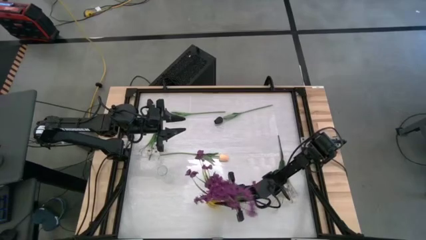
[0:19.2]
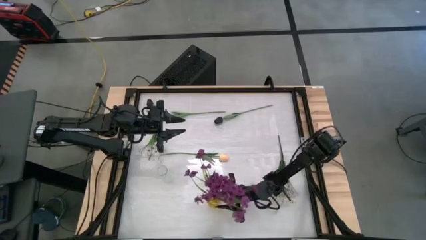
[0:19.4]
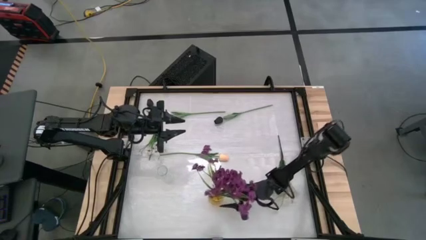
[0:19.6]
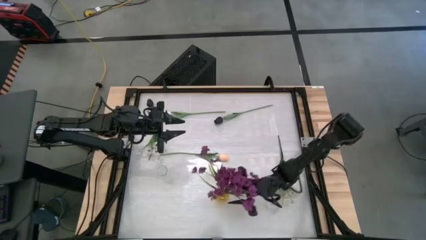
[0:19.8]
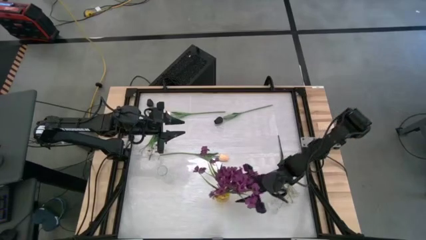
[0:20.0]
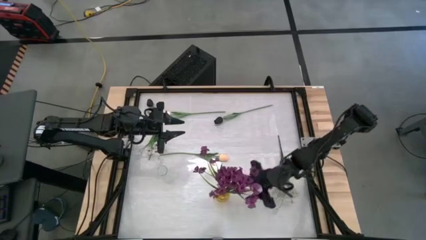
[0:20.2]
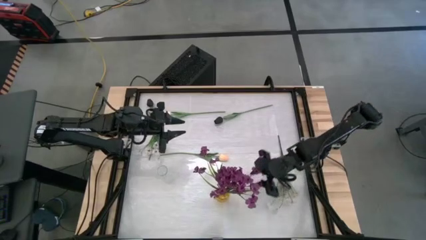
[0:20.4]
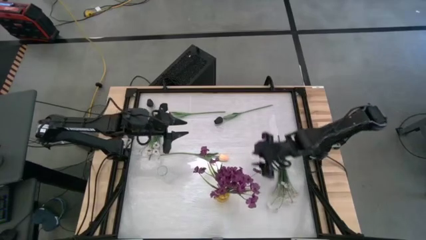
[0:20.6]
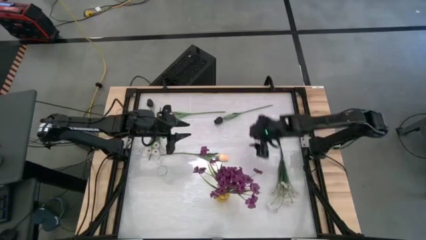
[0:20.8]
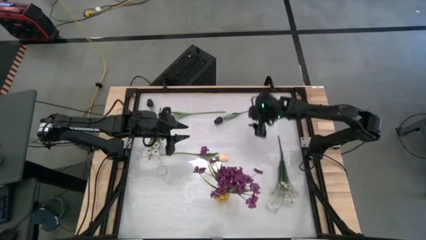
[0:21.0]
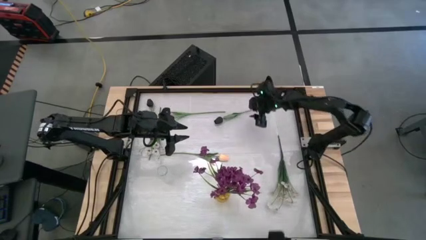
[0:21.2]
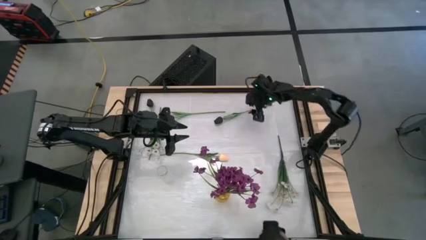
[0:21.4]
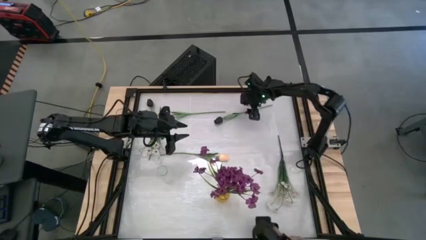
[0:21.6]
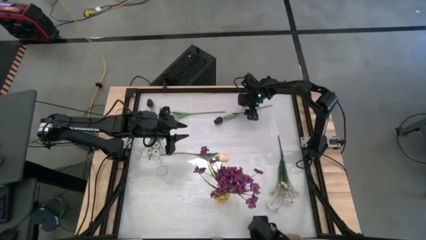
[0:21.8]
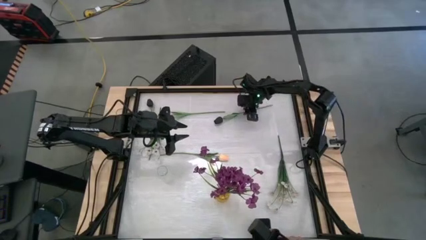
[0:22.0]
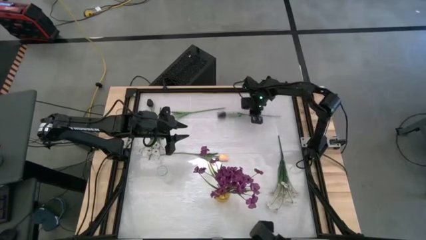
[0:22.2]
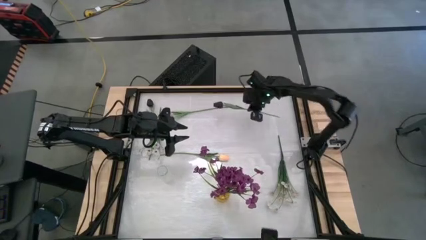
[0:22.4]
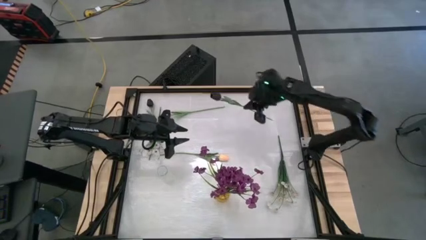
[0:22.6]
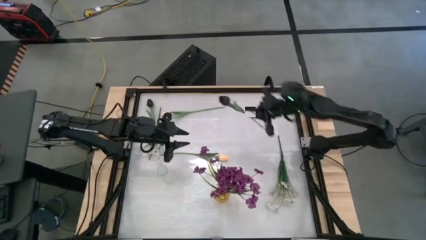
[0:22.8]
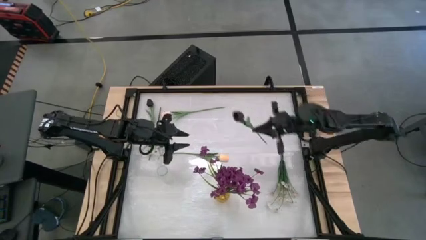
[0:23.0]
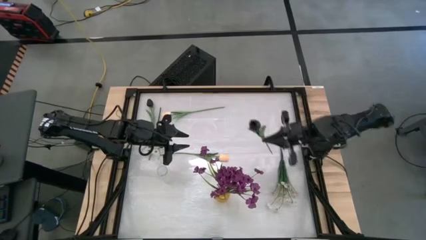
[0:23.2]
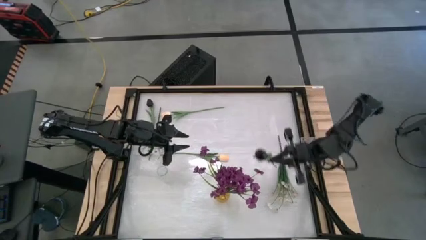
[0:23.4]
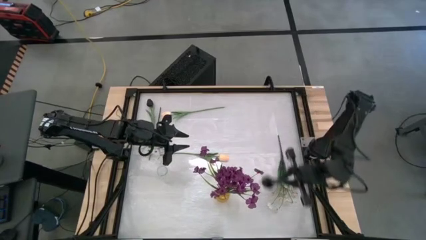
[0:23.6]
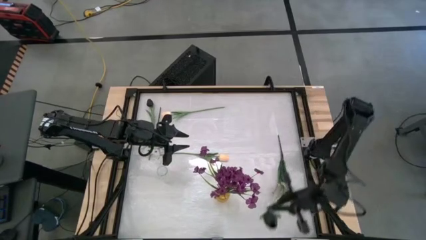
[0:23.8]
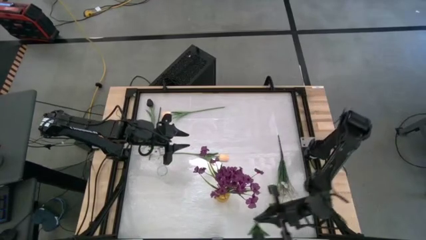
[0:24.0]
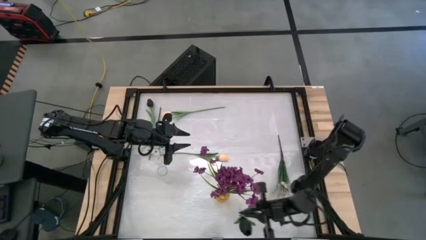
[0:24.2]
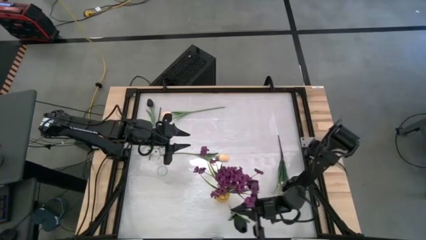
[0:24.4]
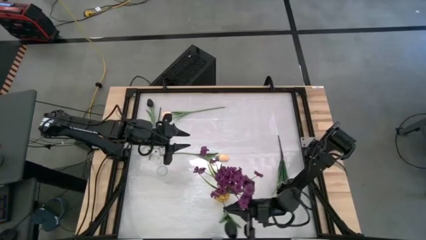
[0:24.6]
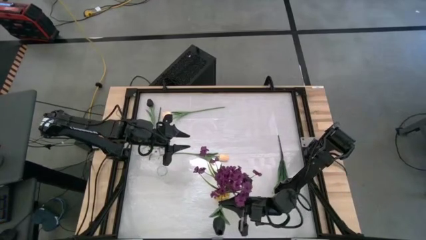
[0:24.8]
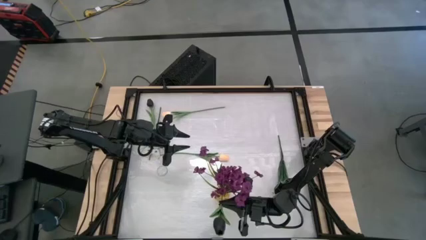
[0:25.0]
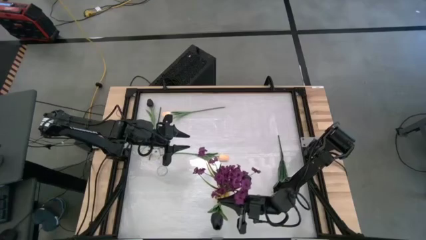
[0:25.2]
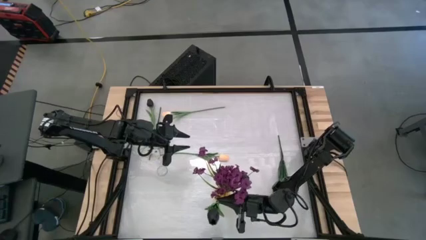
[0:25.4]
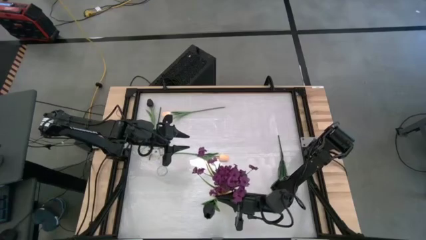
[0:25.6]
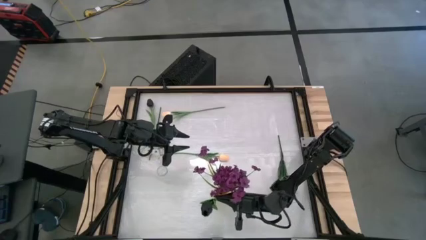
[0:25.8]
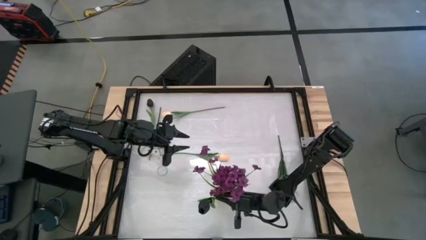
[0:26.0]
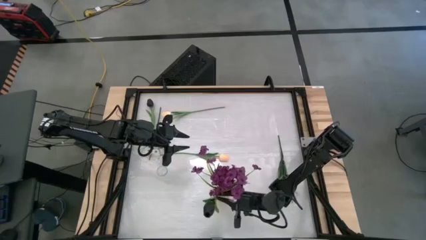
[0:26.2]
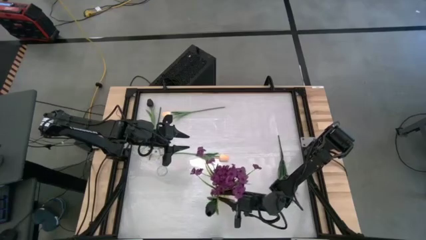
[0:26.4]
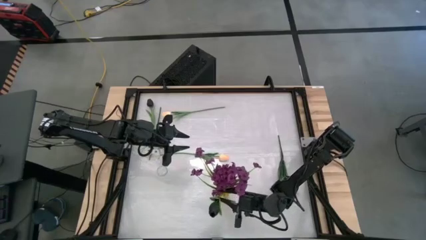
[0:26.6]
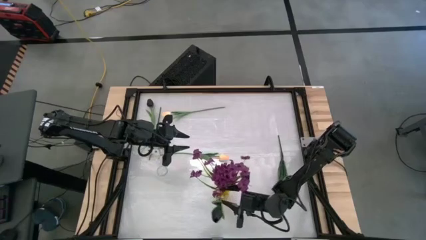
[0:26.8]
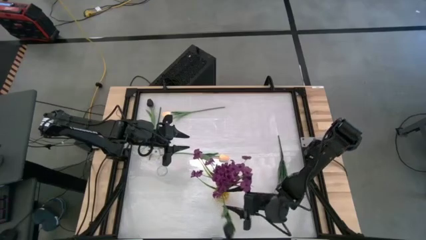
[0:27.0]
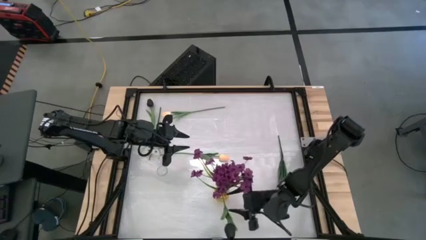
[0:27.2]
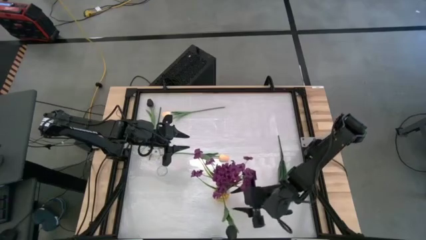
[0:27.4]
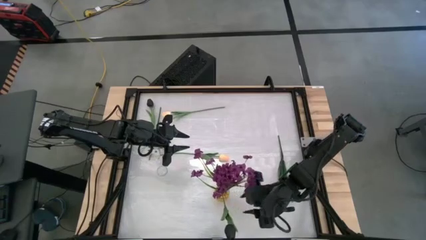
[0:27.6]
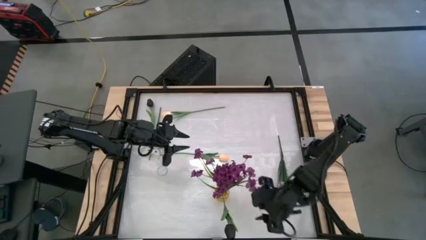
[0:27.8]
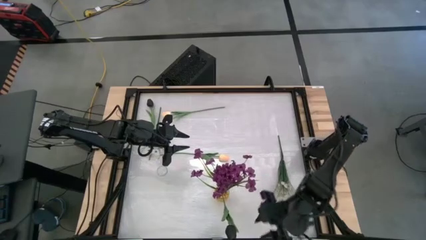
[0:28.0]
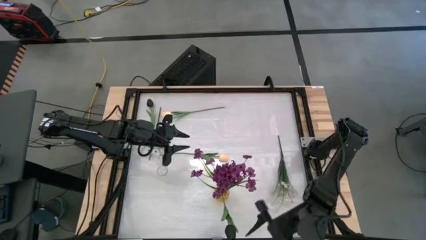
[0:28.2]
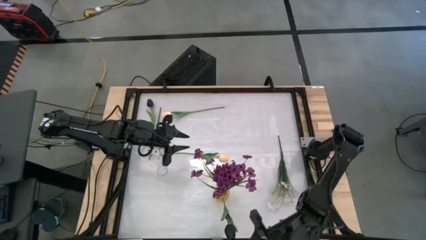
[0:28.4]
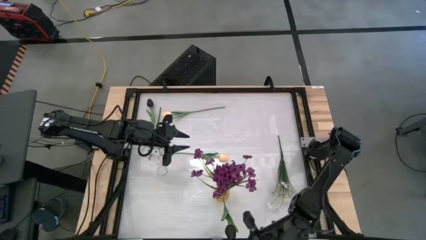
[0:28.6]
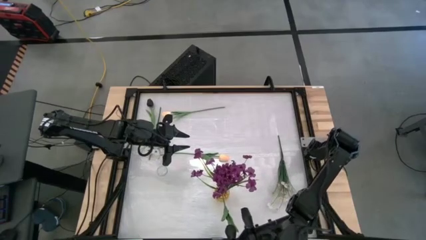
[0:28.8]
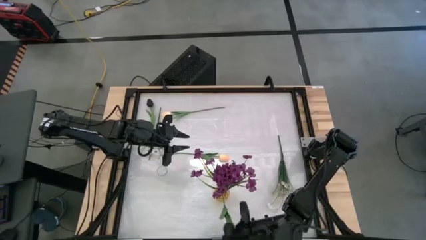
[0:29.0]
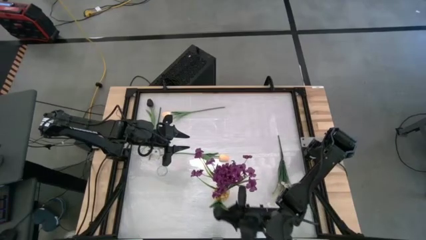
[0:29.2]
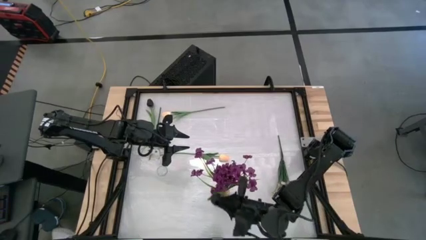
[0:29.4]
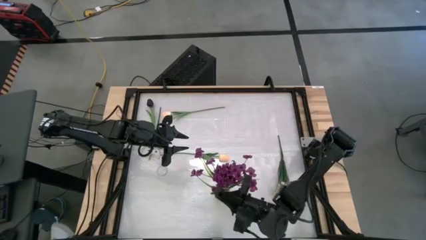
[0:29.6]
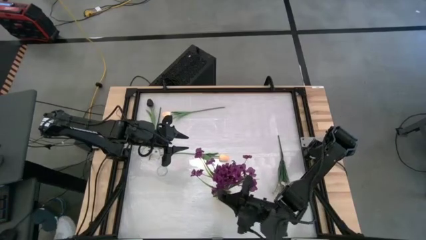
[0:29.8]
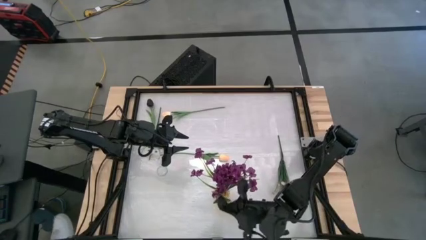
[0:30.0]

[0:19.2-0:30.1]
Task: Sort flowers into vase by color
Put the right black flower into the yellow vase

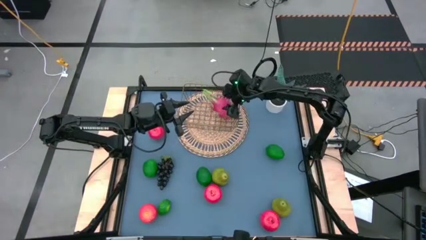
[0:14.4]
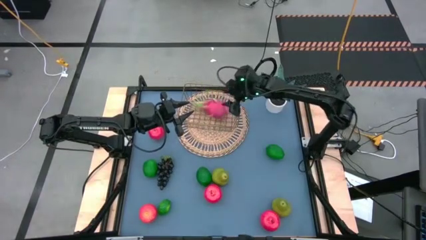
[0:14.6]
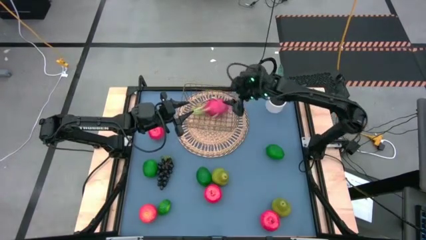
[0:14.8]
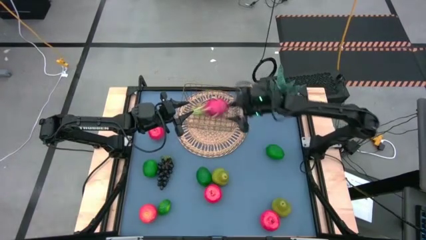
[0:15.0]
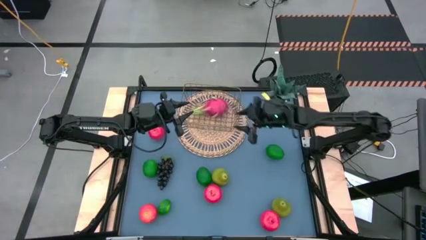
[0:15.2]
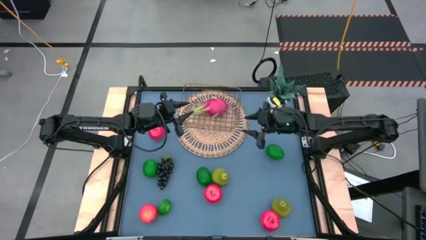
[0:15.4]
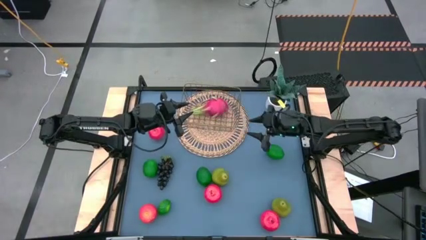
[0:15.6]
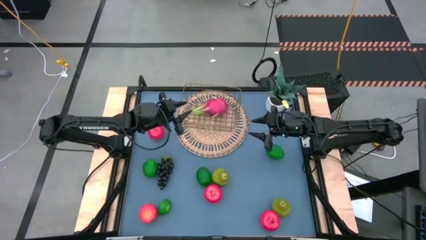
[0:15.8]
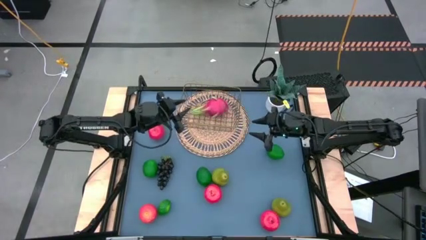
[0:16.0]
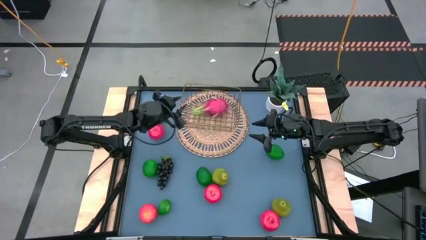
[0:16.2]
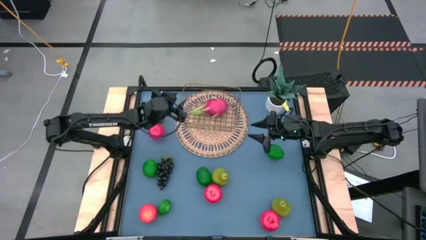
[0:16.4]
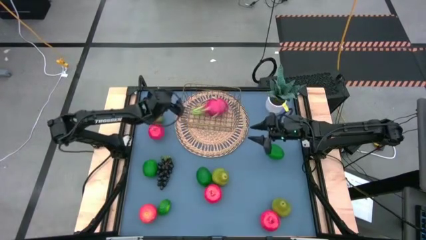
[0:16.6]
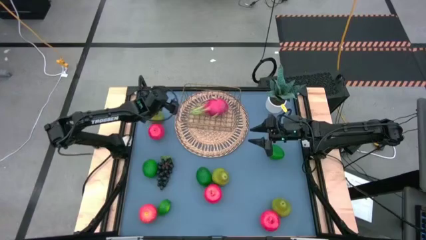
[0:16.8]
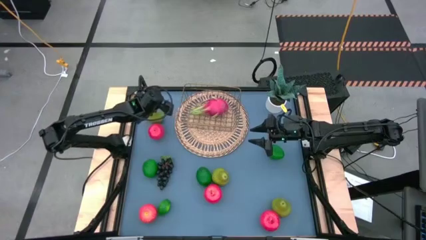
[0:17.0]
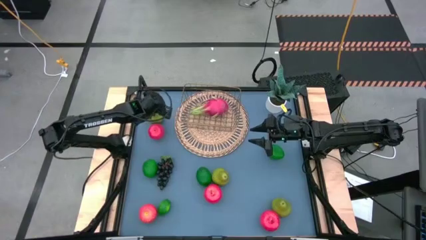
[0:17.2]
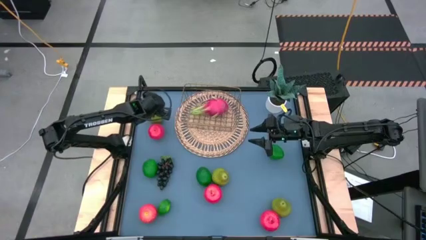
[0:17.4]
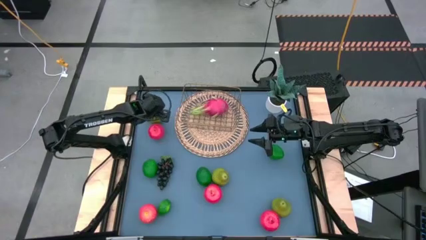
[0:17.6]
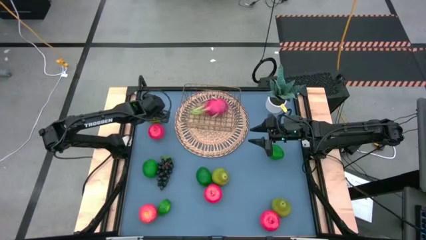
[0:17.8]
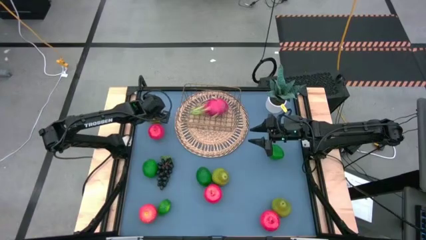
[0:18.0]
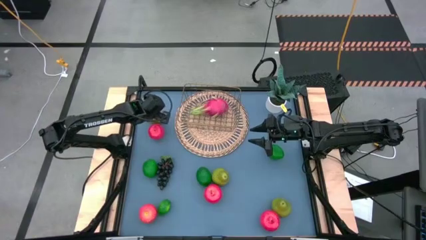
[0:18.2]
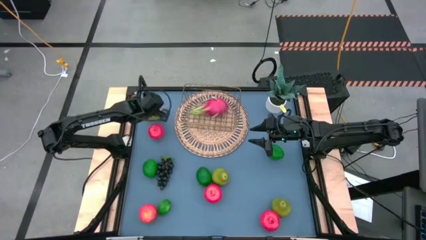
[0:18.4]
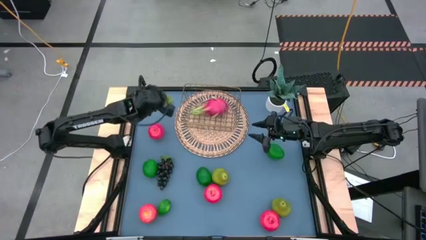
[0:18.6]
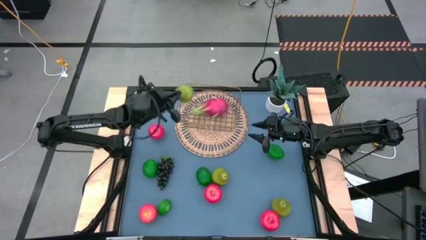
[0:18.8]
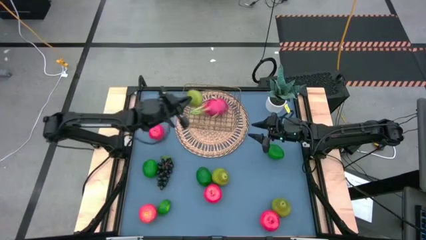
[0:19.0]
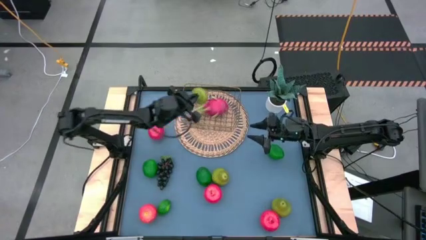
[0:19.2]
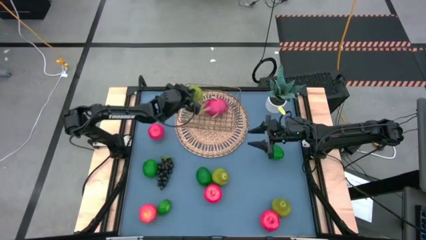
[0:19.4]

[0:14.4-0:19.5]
Task: Build produce basket
Put the green pear into the gold wire basket
